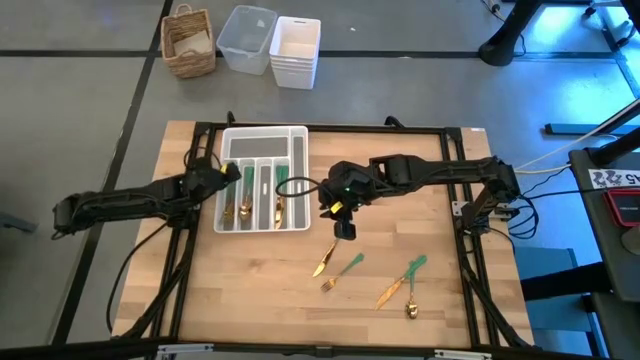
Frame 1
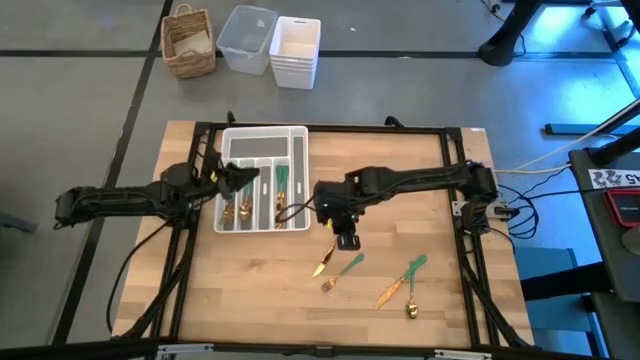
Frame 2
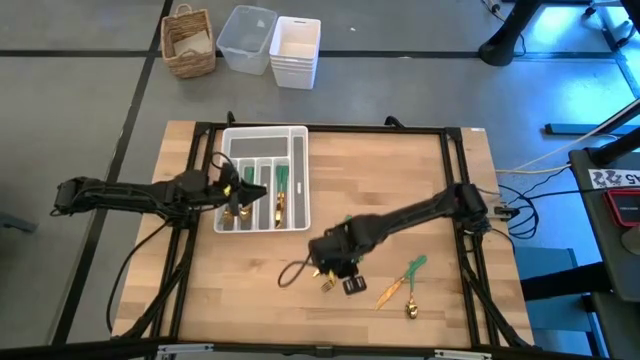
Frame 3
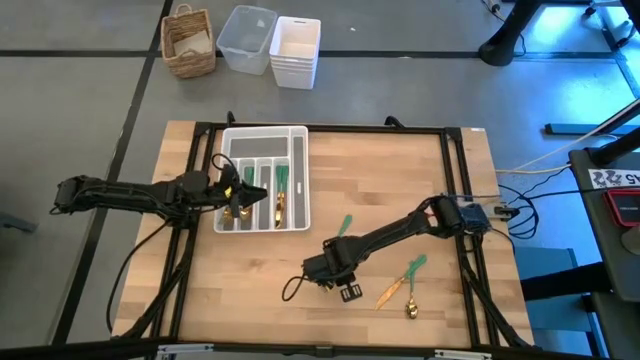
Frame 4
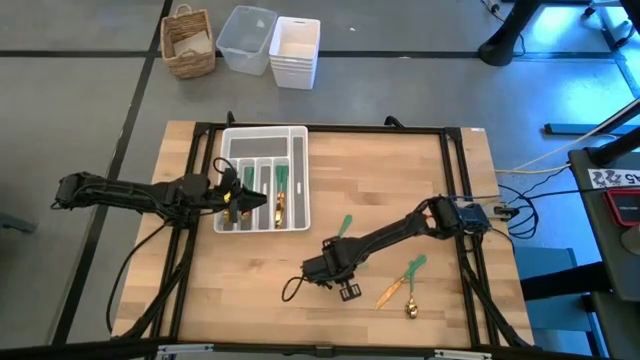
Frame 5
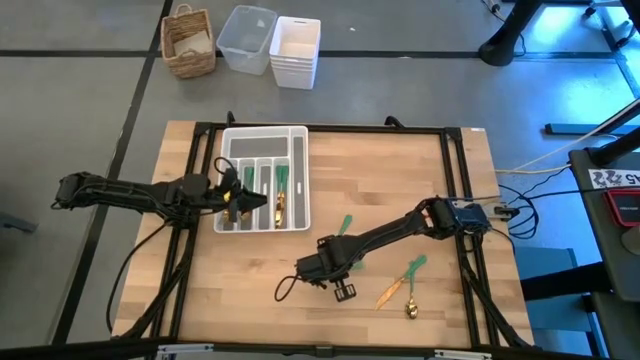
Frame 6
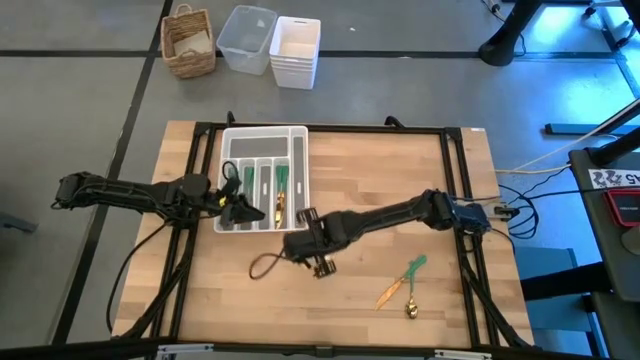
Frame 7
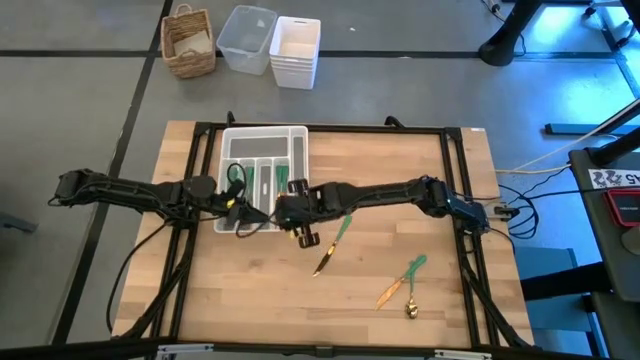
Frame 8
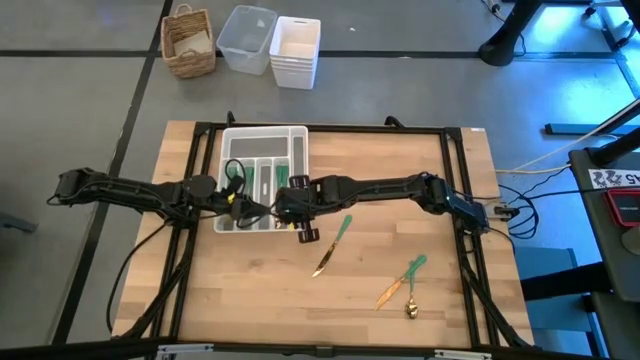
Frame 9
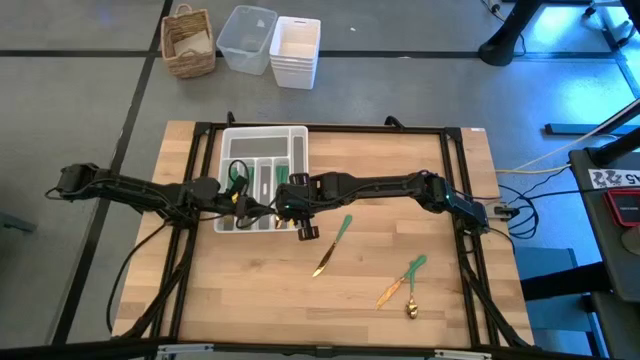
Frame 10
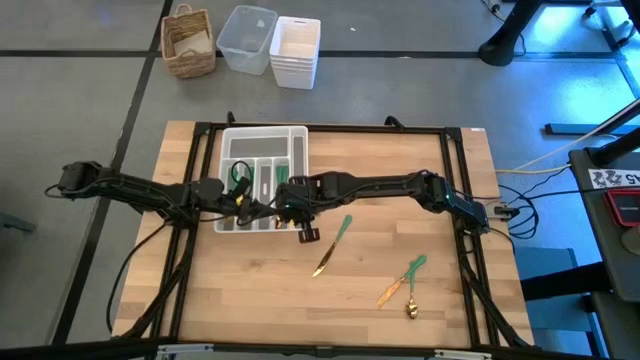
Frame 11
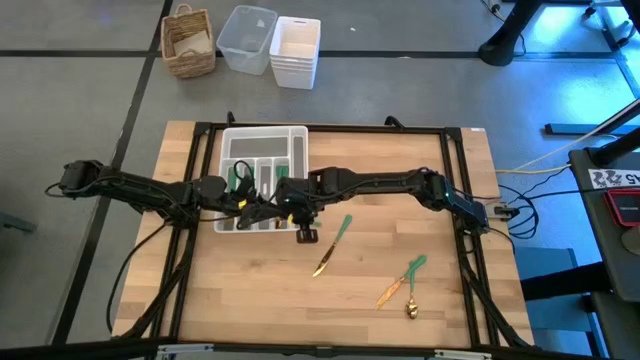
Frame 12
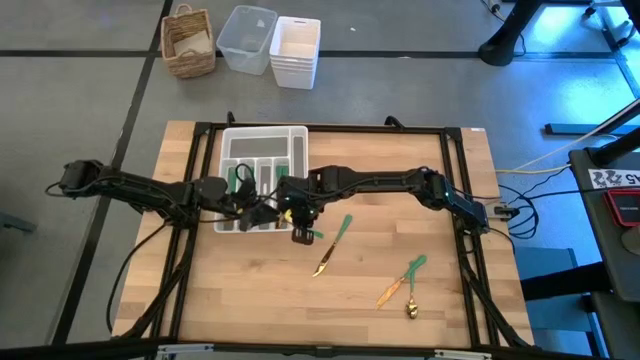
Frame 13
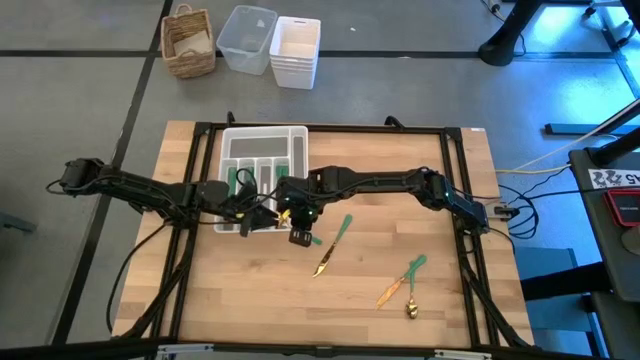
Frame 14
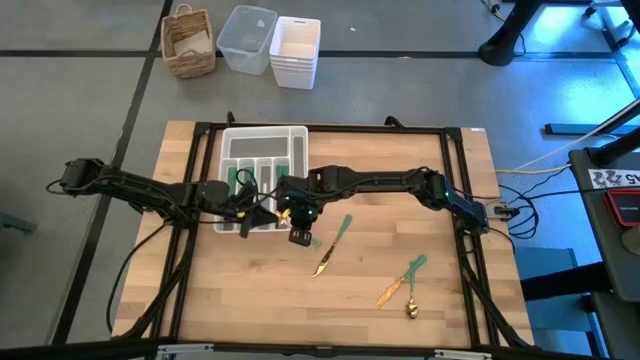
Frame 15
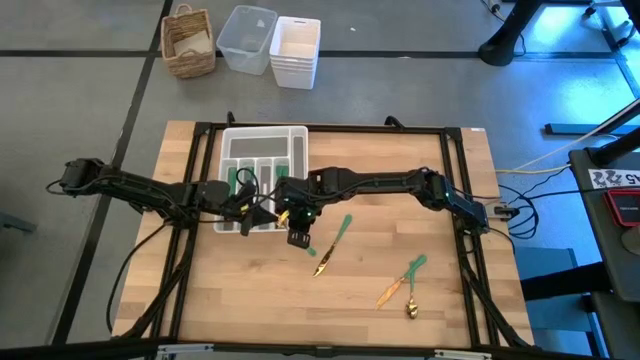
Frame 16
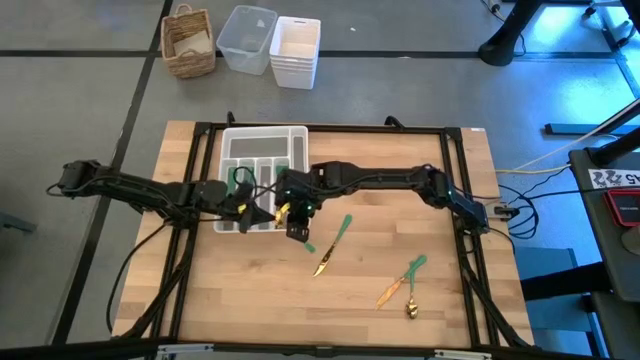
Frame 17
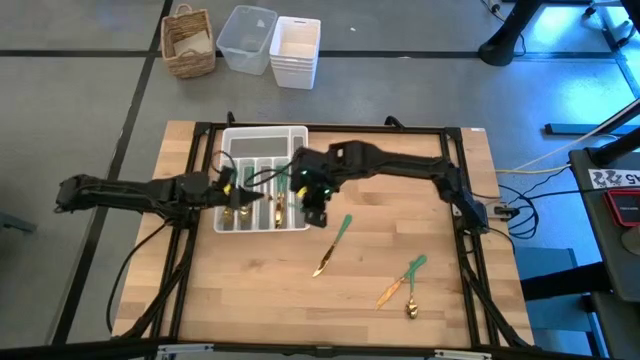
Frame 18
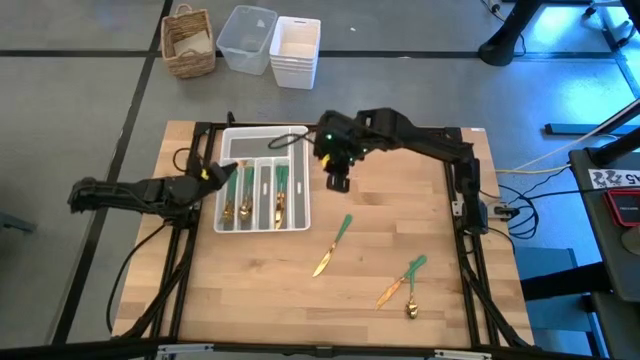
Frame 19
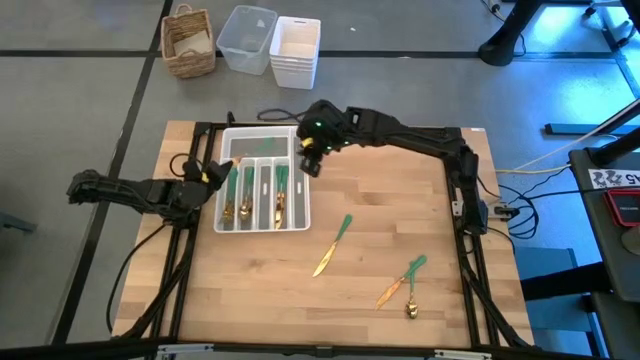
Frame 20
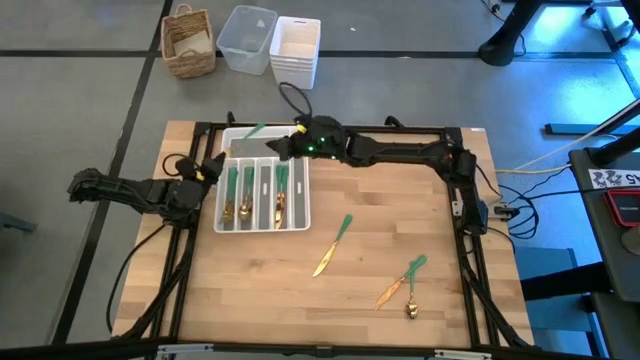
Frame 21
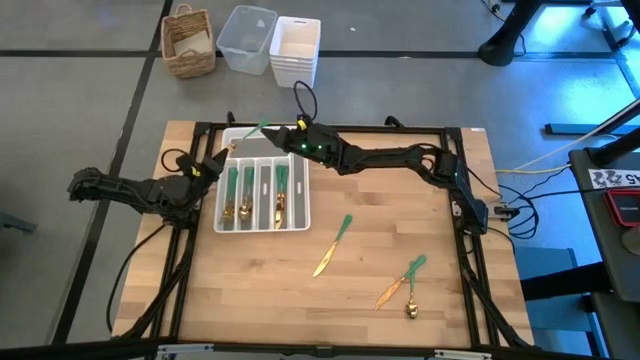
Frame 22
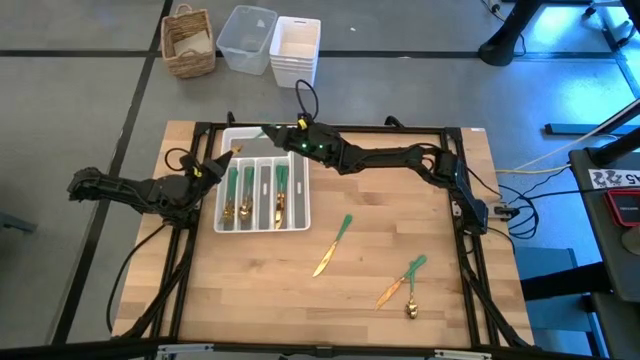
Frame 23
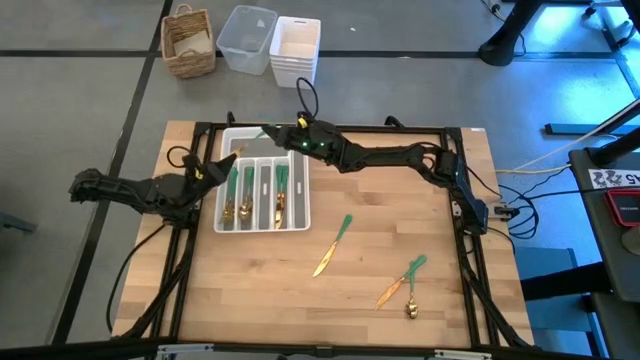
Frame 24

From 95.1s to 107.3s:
Task: Sort silverware
Put the green fork into the white silverware tray

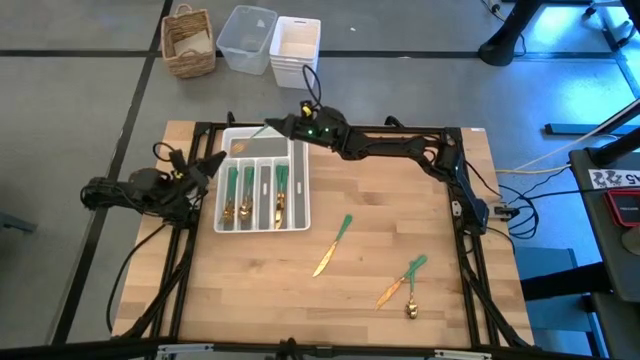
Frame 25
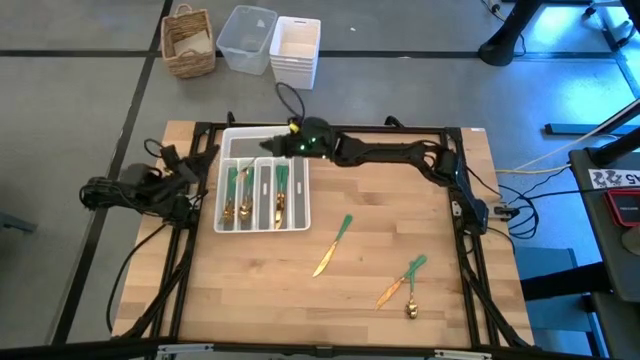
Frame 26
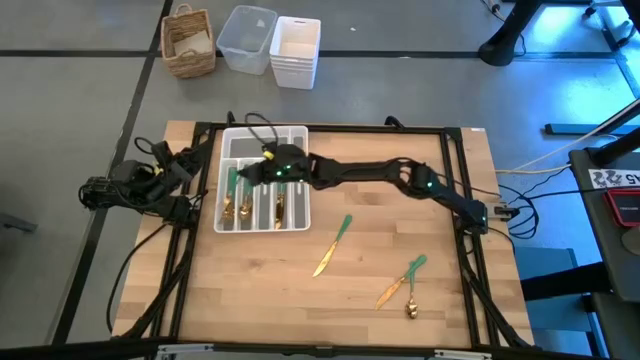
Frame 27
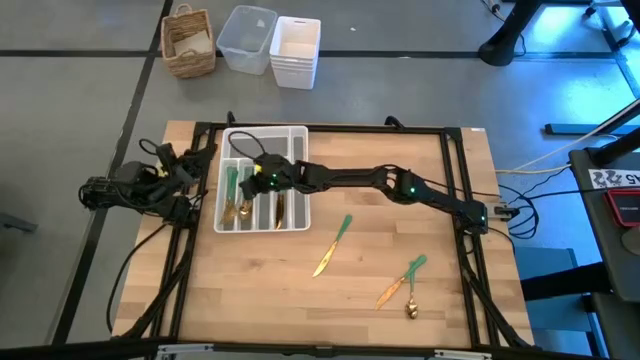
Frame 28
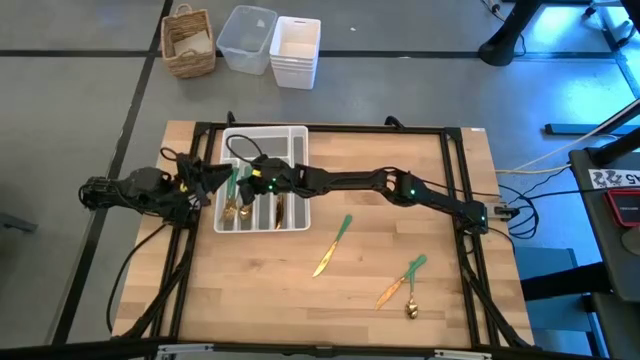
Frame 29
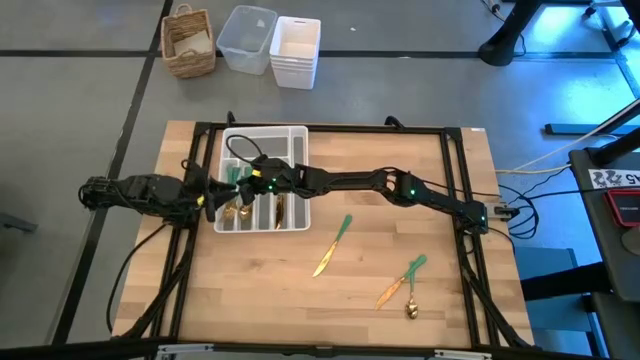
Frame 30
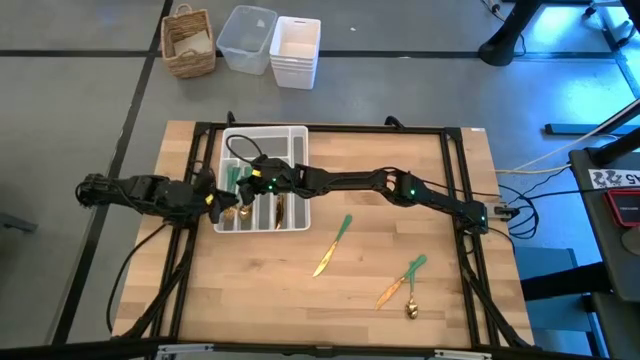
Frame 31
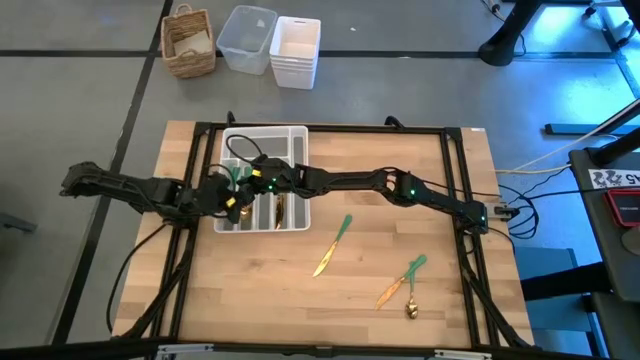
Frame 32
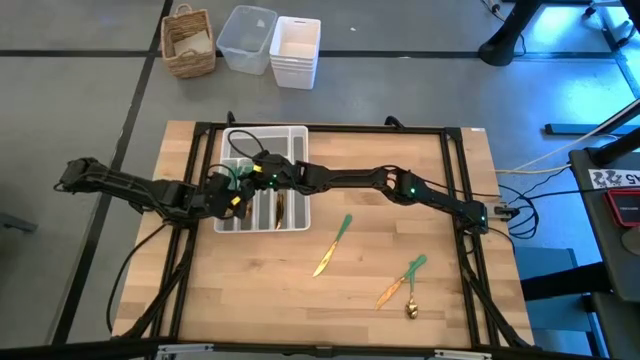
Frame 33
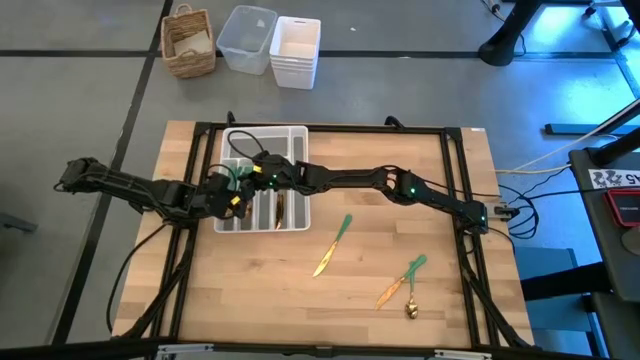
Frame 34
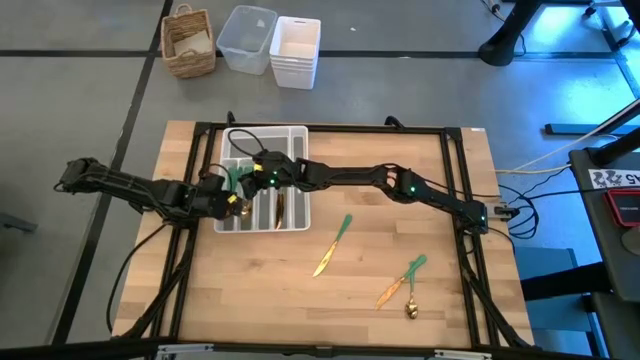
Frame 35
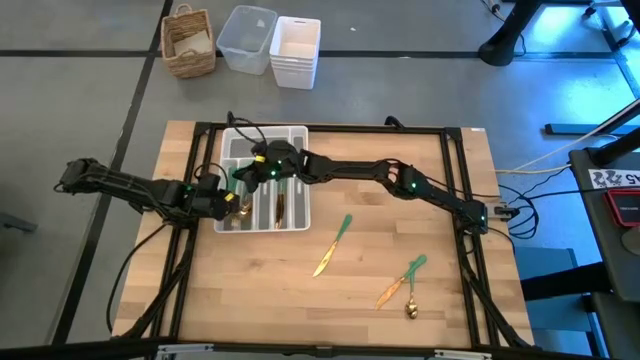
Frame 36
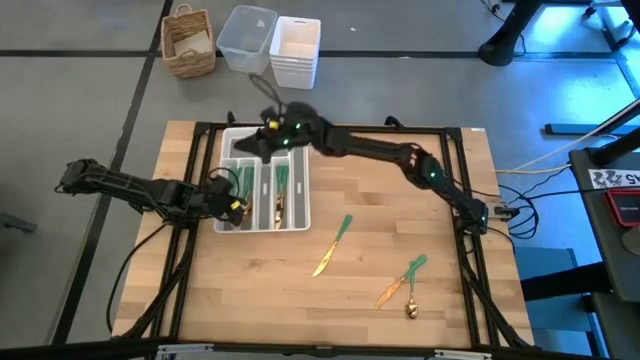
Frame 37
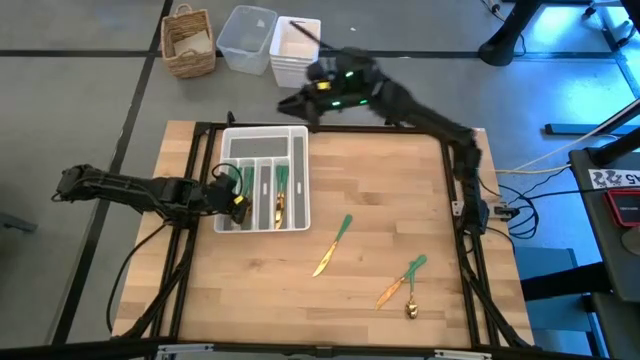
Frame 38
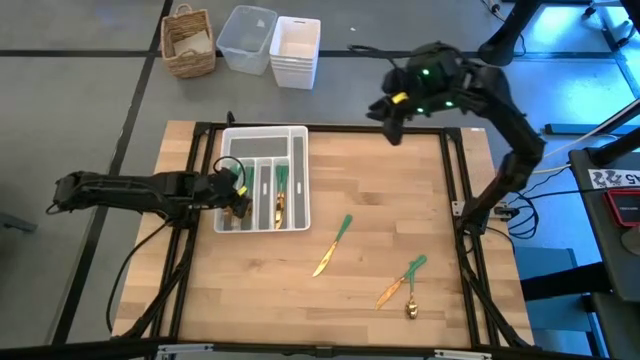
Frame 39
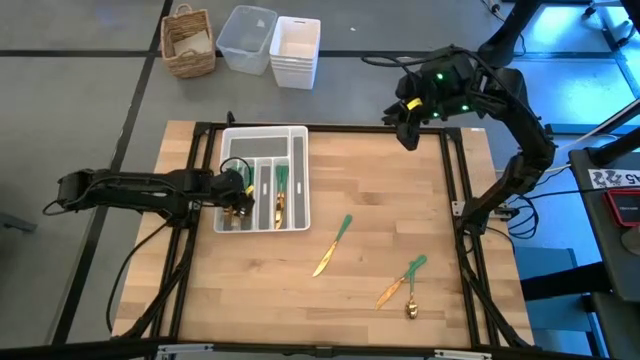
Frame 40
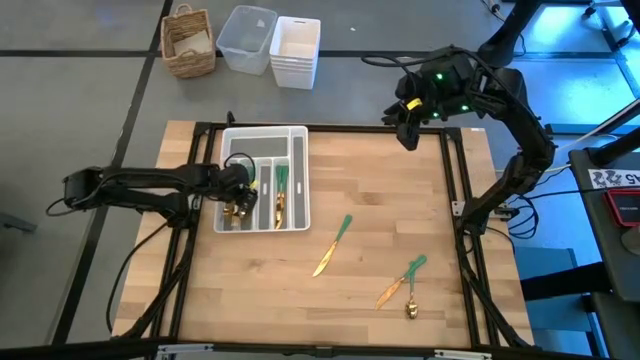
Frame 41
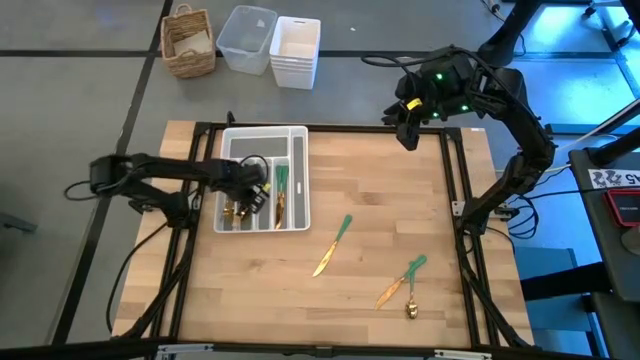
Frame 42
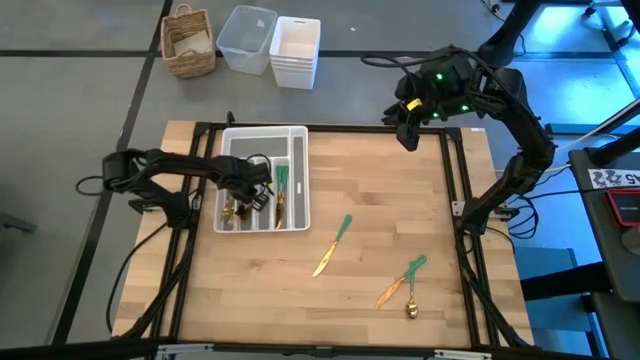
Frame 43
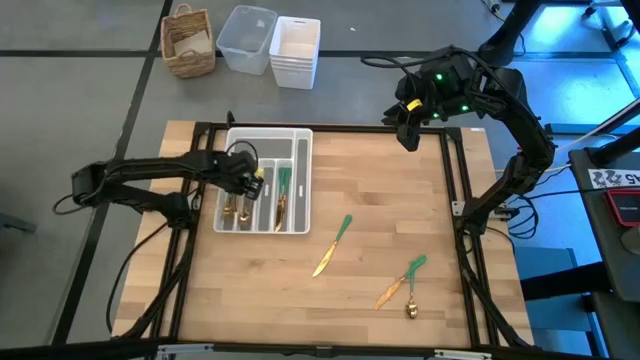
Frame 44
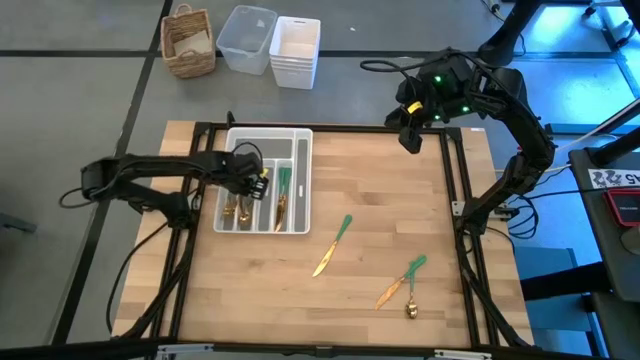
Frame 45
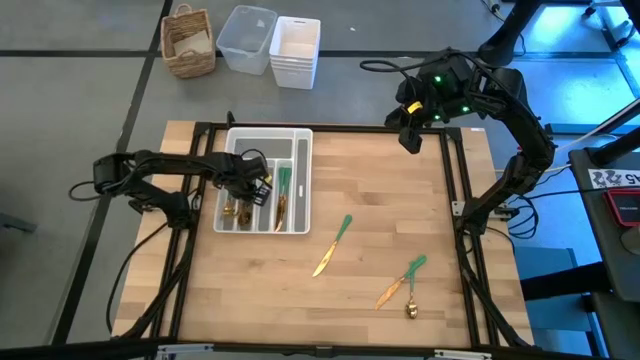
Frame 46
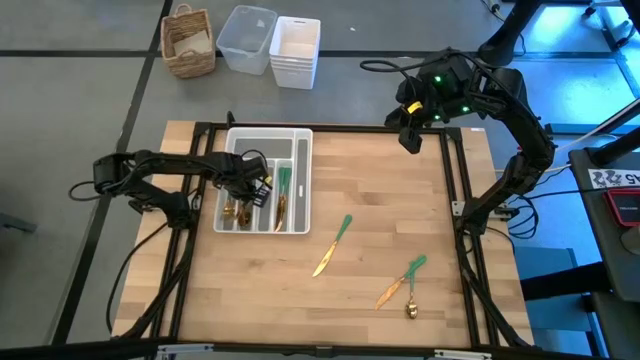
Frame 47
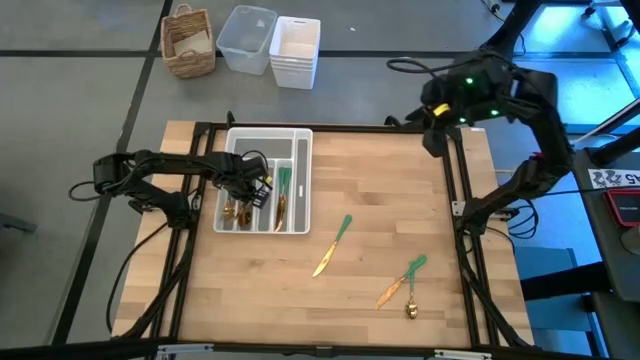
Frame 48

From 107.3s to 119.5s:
Put the green fork into the white silverware tray
